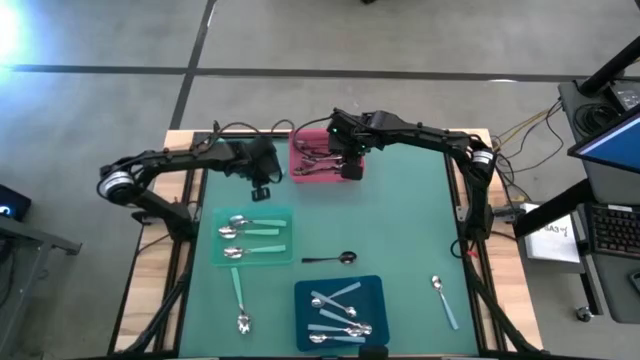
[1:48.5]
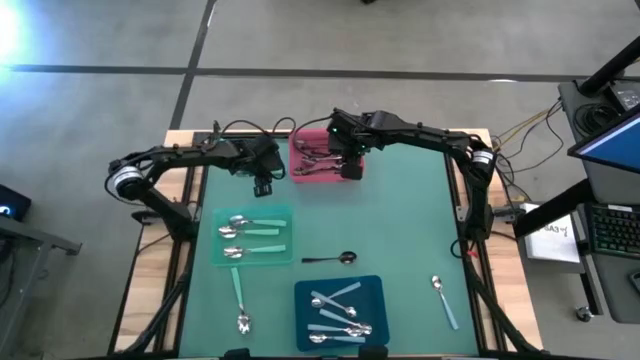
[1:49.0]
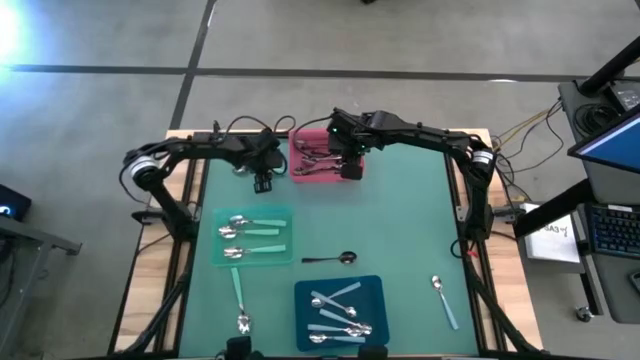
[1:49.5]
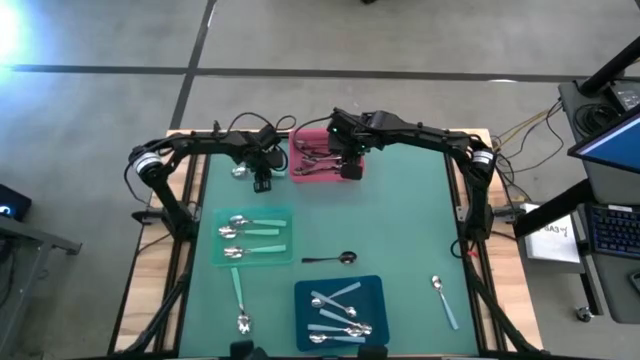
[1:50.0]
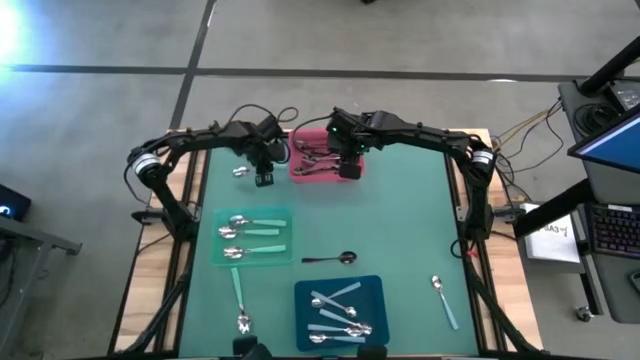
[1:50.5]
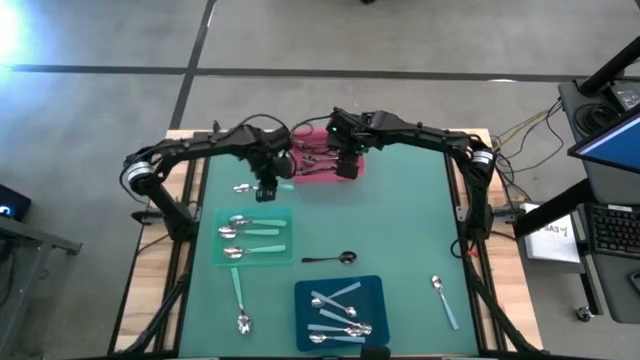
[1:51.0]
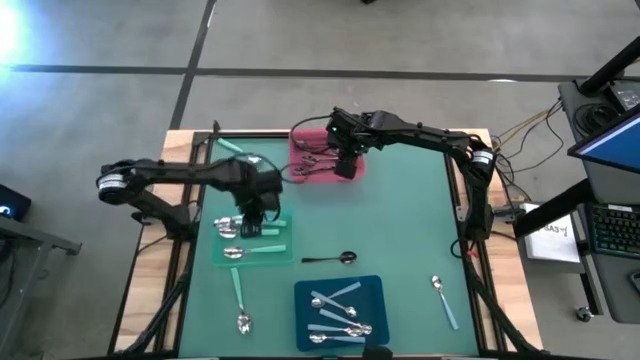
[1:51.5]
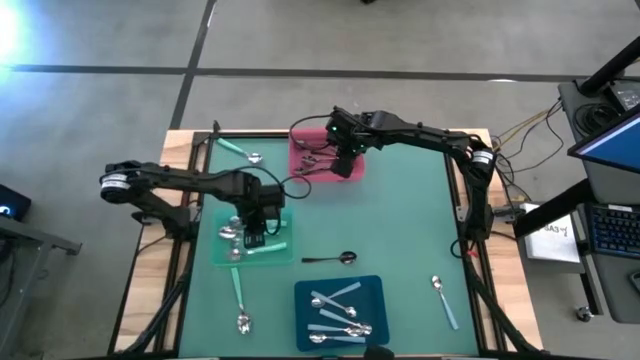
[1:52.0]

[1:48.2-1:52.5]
Task: Sort silverware by color (type)
Put the green spoon into the green bin

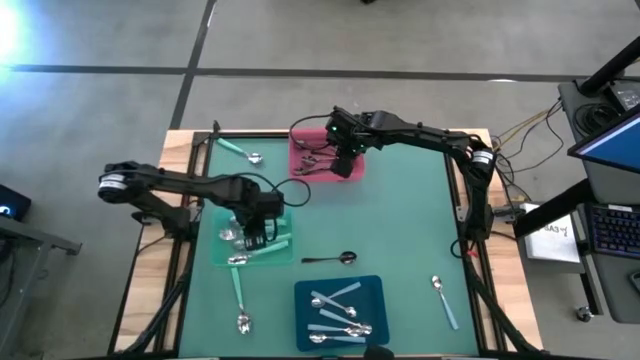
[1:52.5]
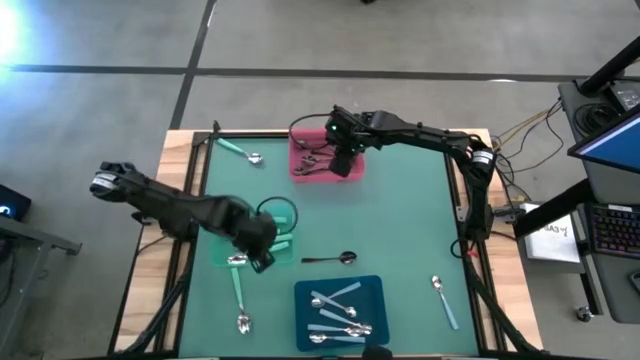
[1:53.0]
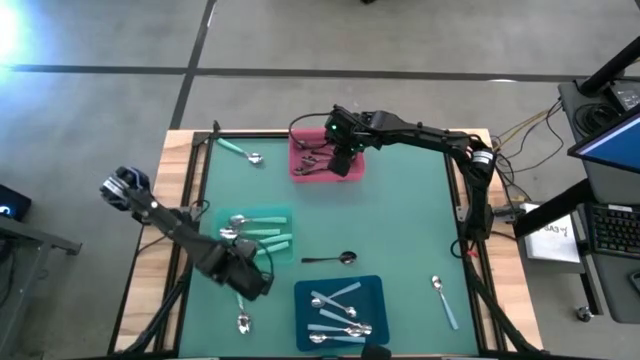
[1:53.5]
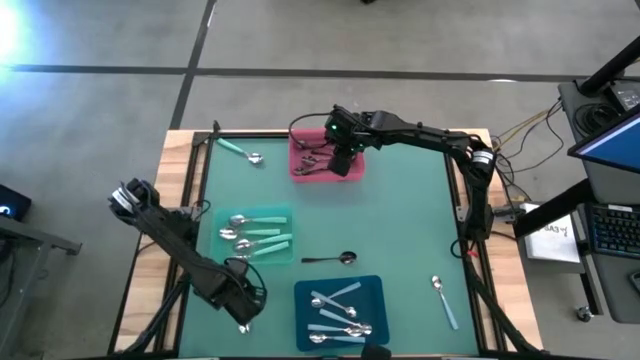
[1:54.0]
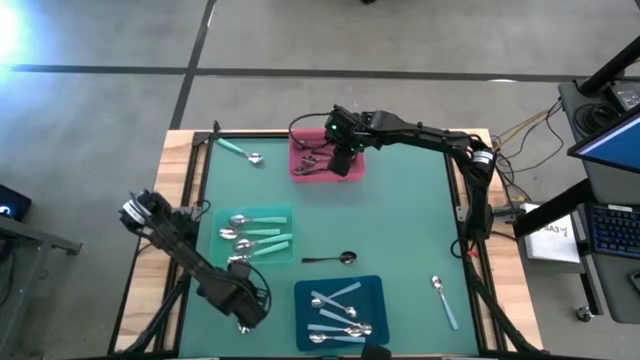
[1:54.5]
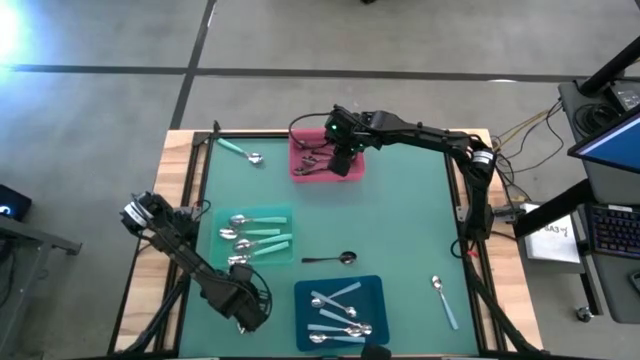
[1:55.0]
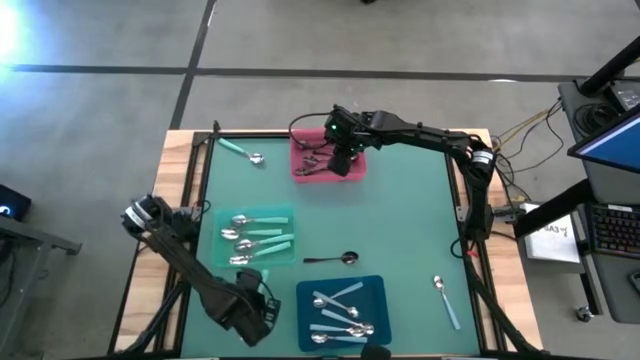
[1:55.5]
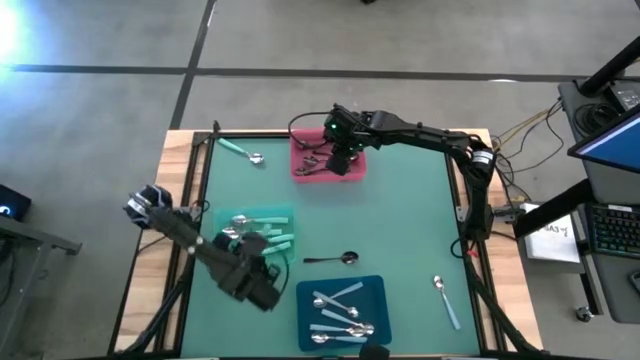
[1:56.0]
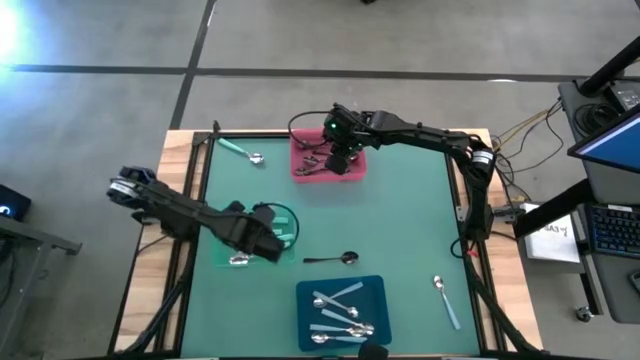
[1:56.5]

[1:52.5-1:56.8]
Put the green spoon into the green bin

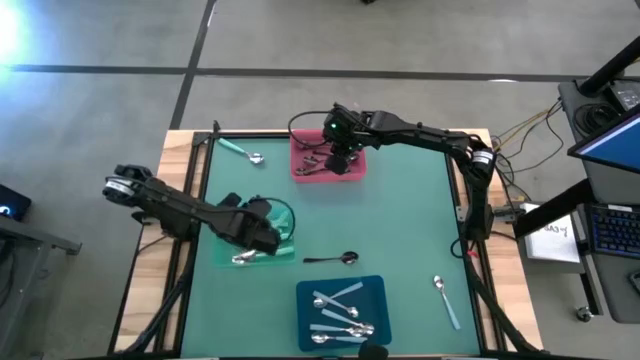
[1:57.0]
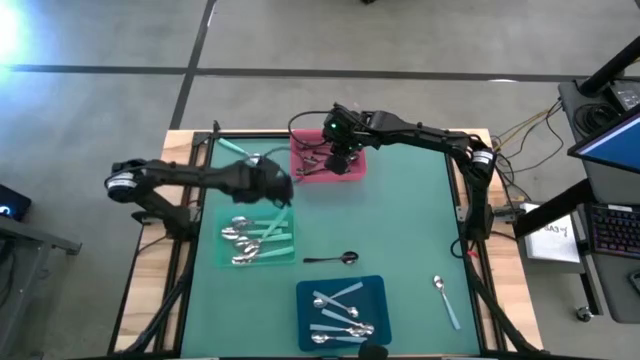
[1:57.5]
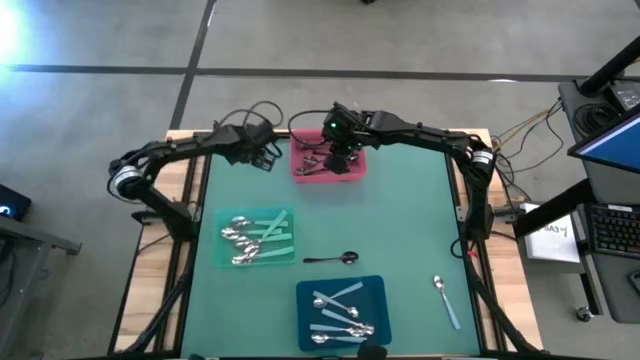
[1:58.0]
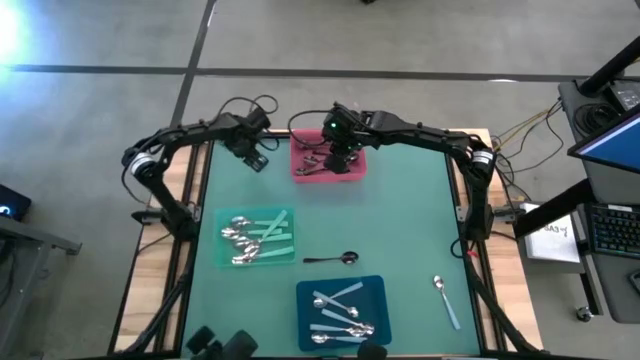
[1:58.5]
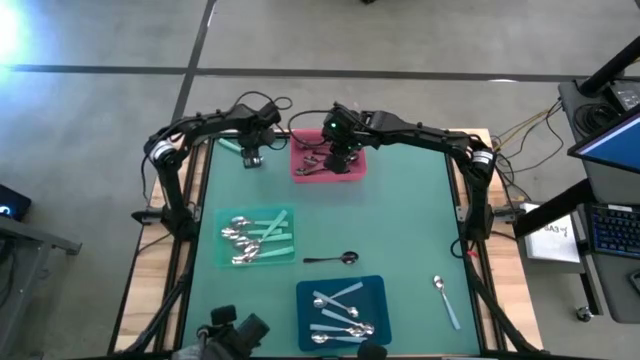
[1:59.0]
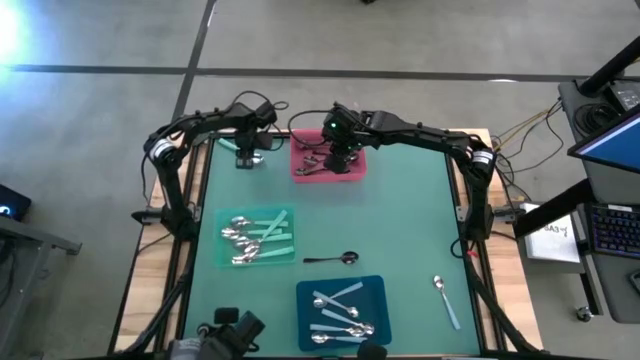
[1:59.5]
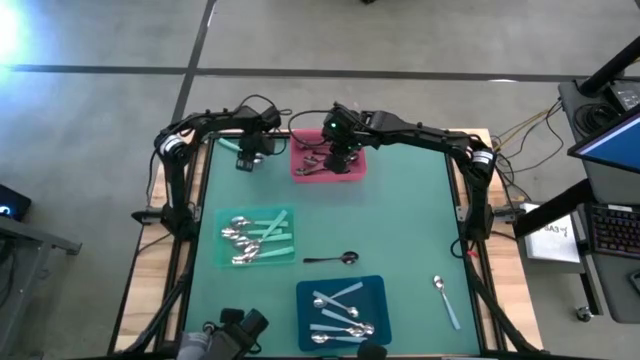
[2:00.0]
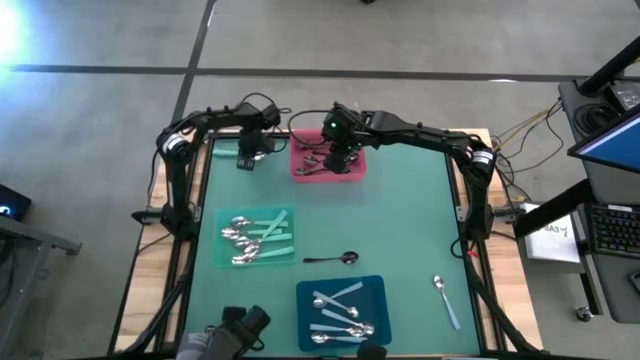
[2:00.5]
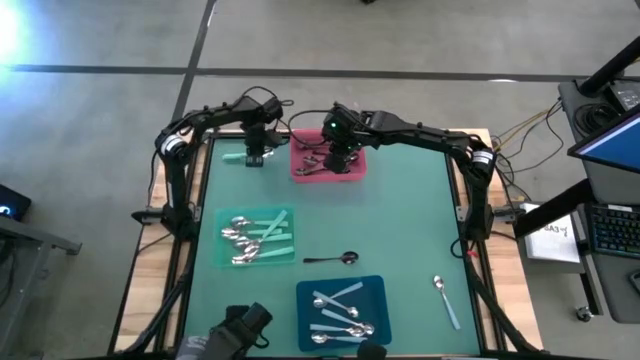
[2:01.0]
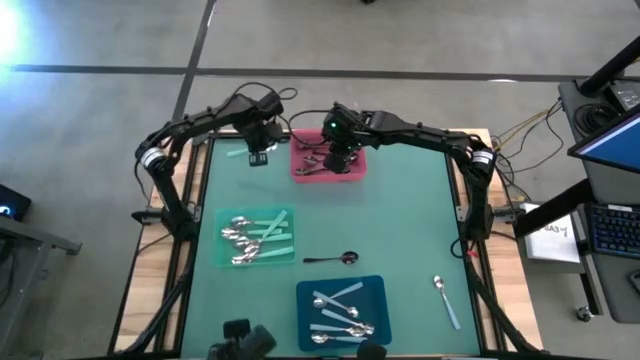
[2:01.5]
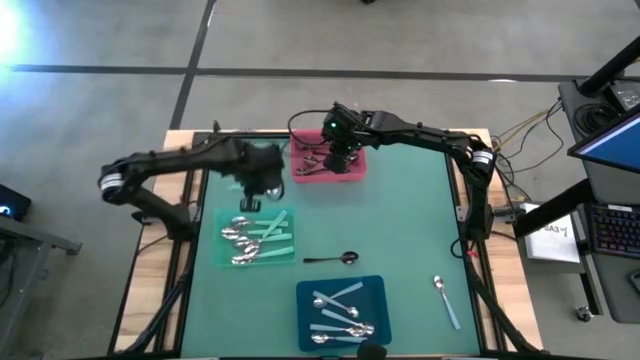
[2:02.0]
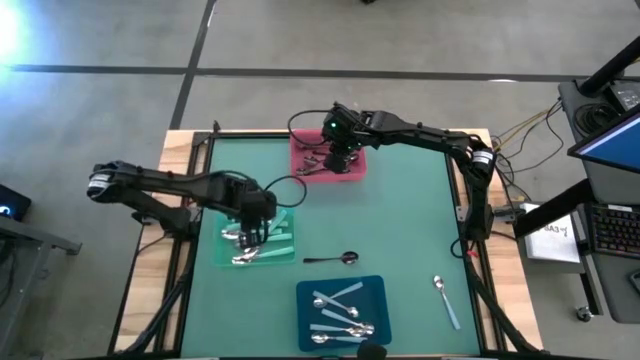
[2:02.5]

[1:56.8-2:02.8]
Put the green spoon into the green bin

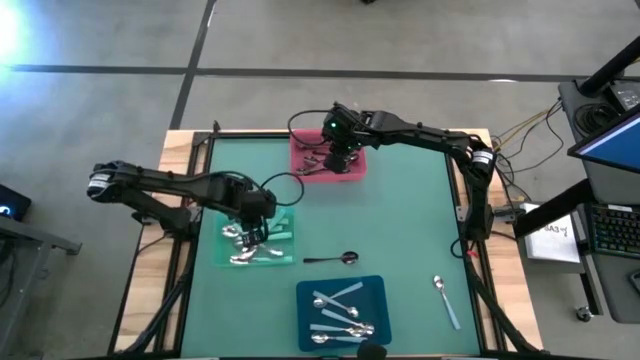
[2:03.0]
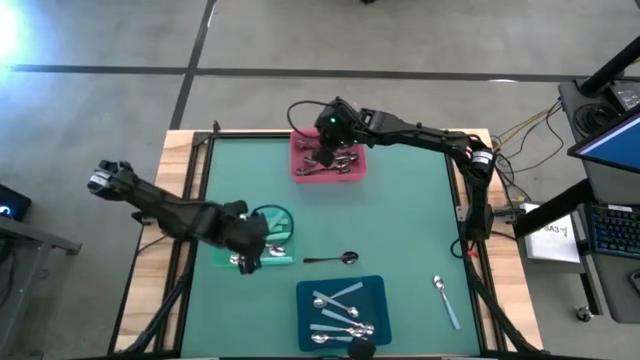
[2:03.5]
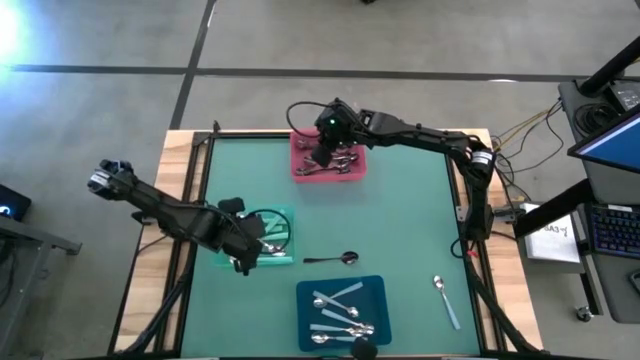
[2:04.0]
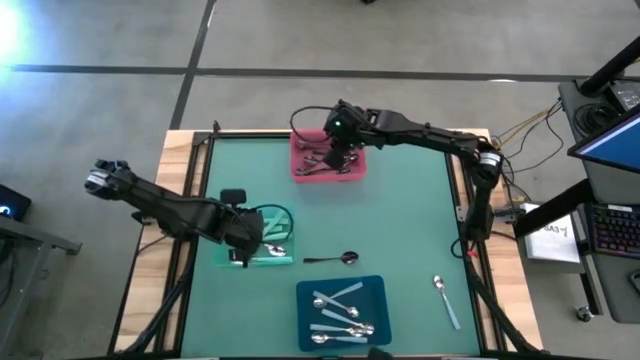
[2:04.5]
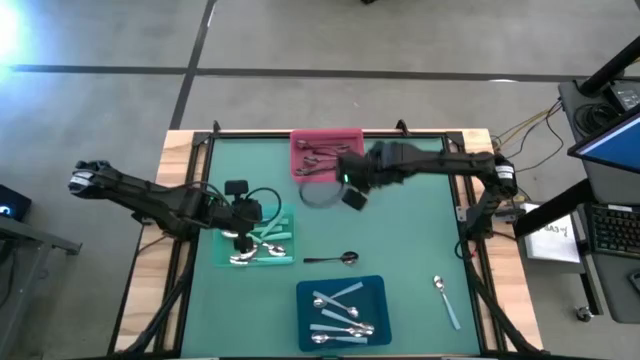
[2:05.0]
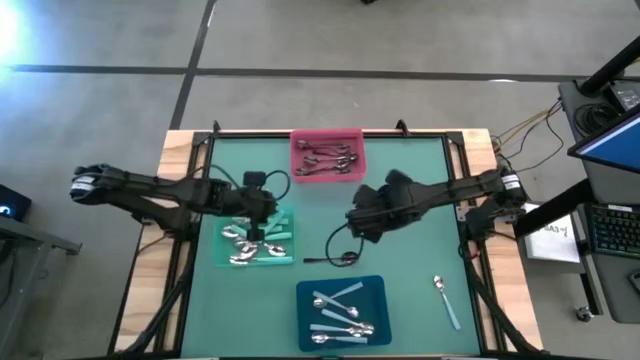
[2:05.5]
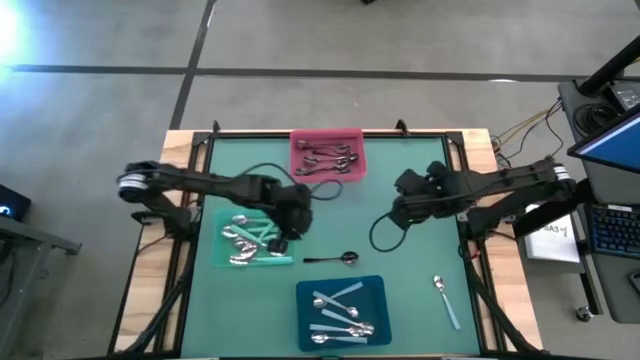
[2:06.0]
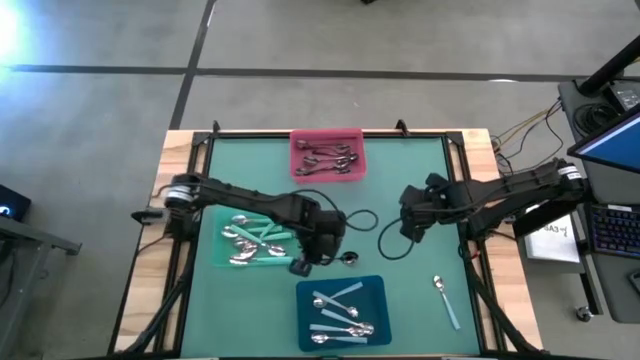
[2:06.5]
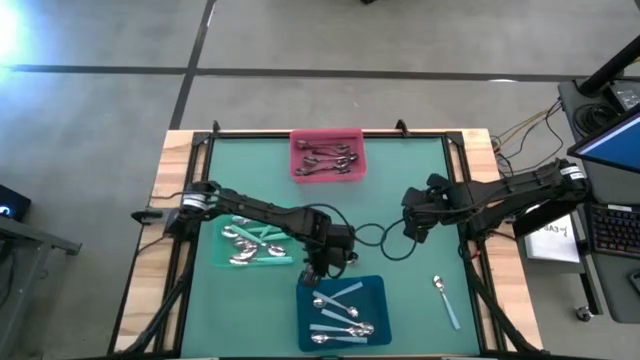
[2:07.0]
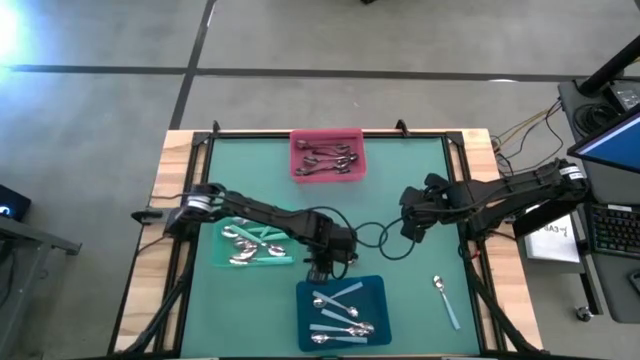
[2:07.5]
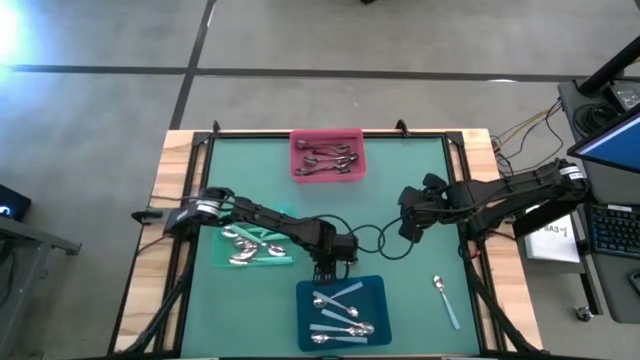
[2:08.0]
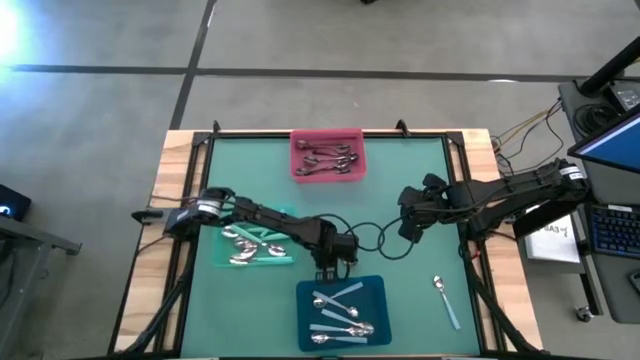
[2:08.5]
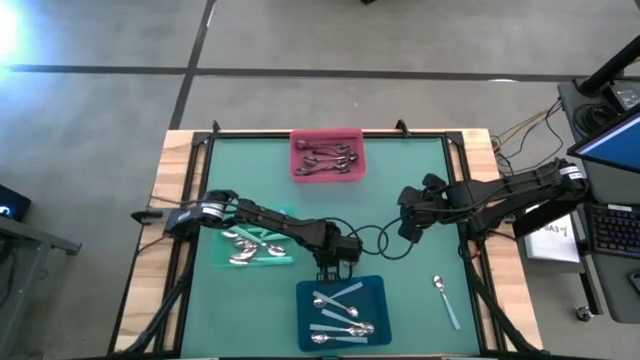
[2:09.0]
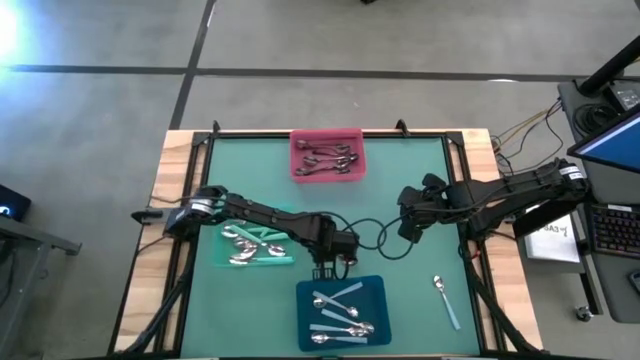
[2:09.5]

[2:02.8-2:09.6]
Put the black spoon into the red bin

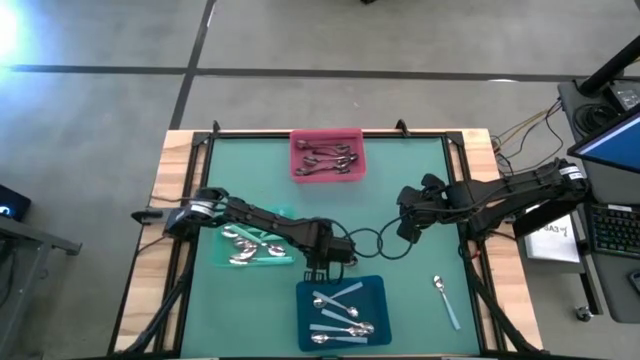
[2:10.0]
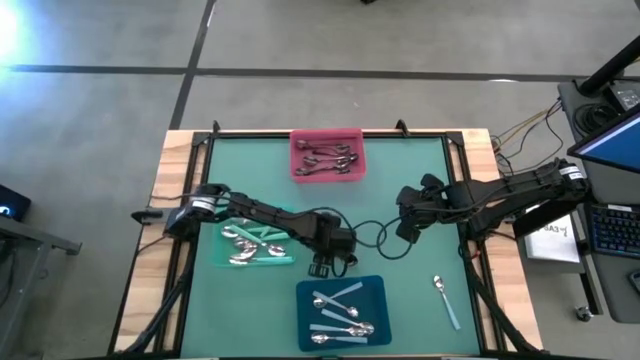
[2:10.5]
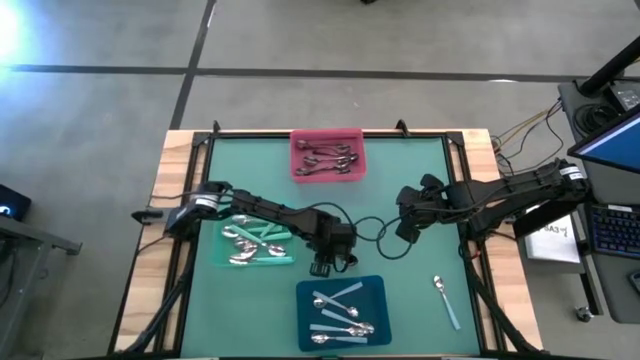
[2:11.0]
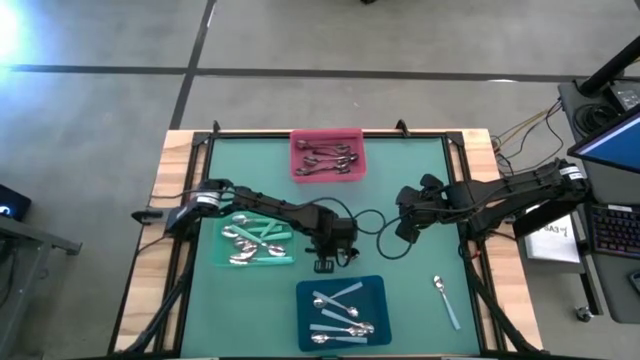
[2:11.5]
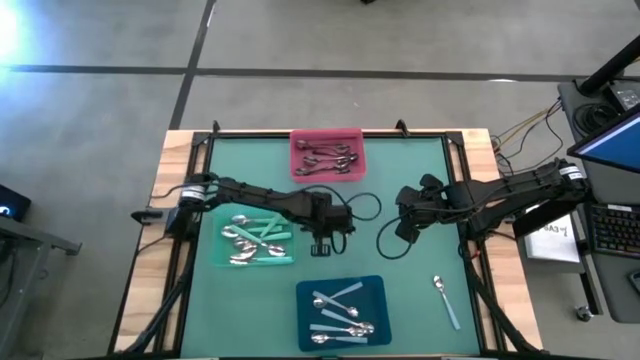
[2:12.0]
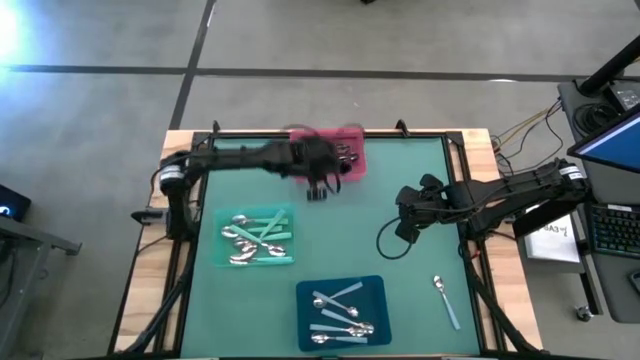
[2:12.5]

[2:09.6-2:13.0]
Put the black spoon into the red bin
